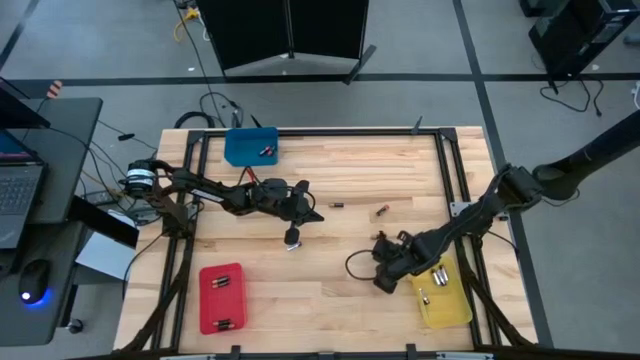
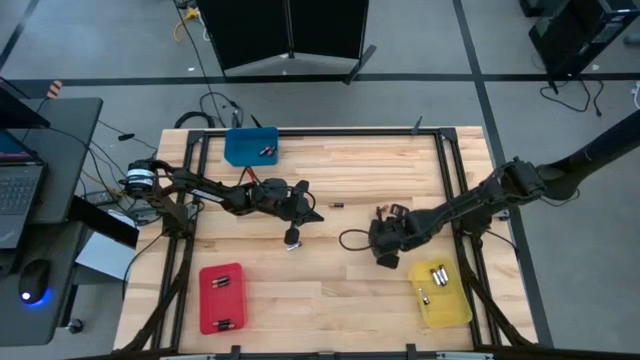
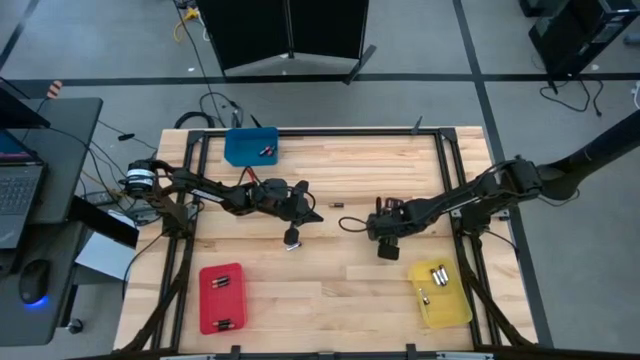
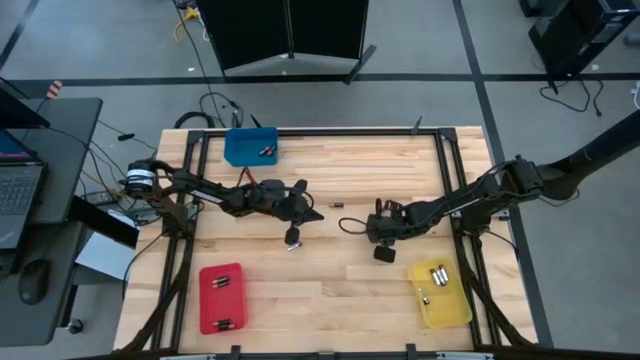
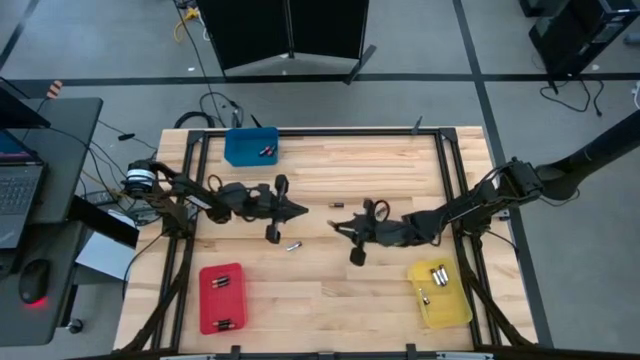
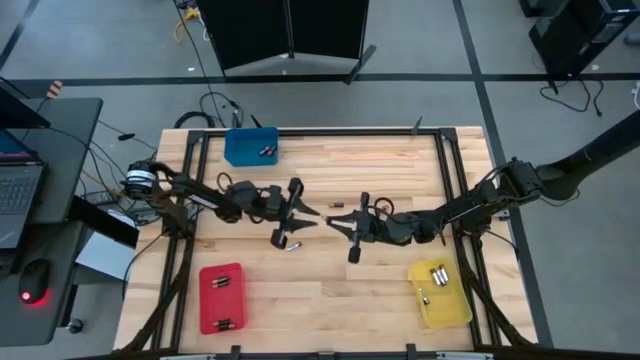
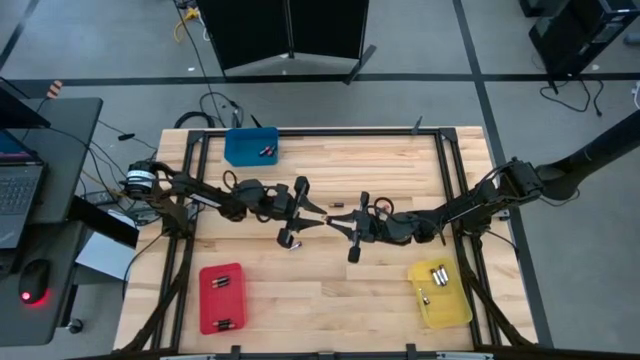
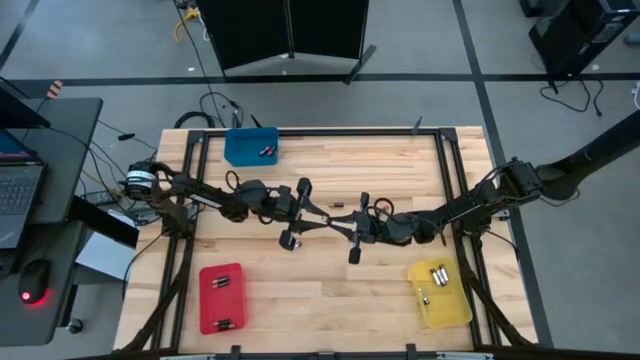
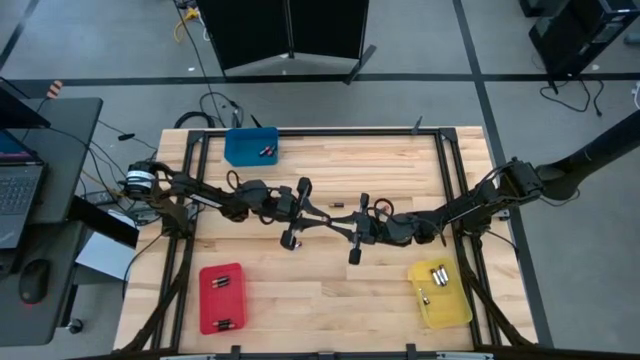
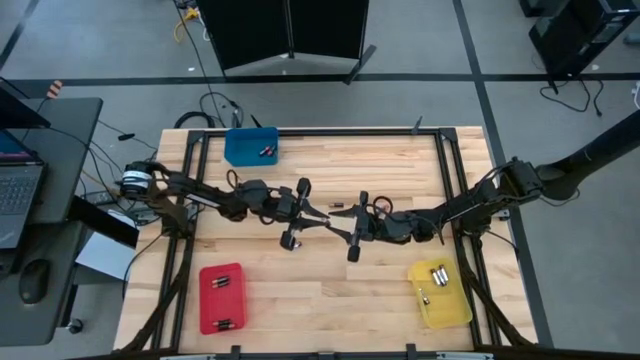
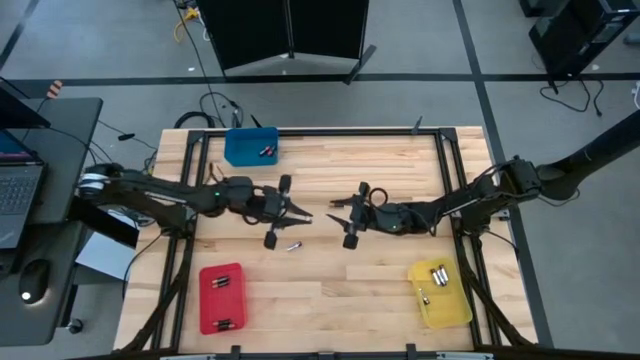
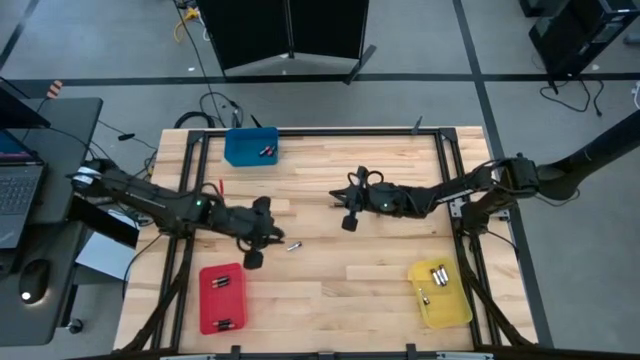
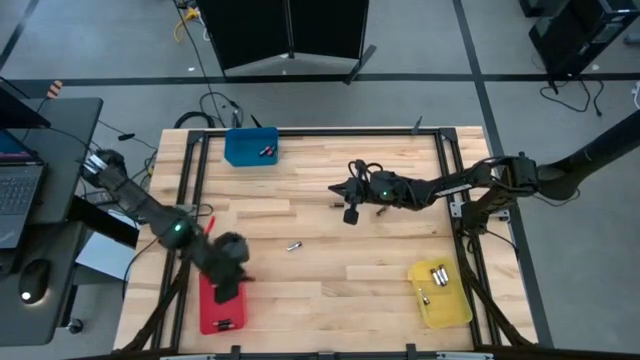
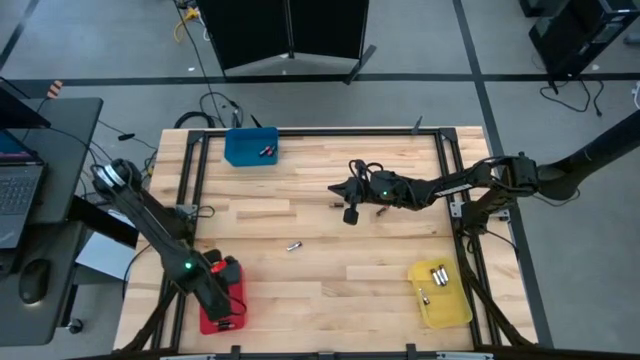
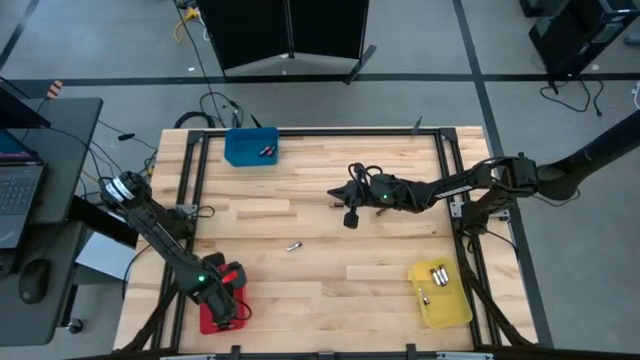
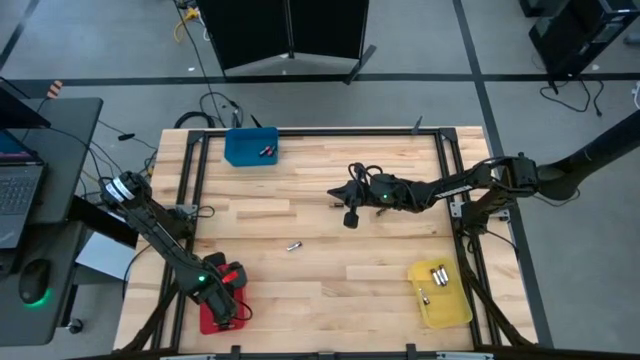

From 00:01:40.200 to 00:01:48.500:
Task: Sort batteries
Put the brown battery into the red bin

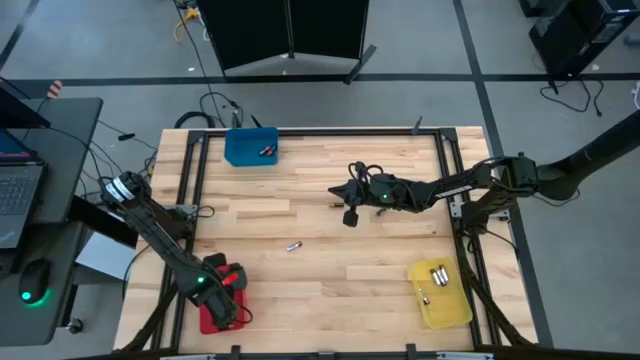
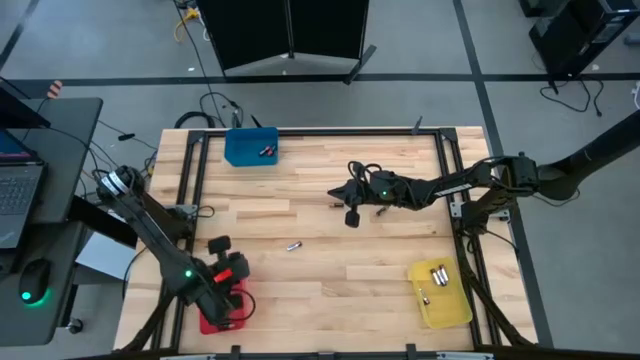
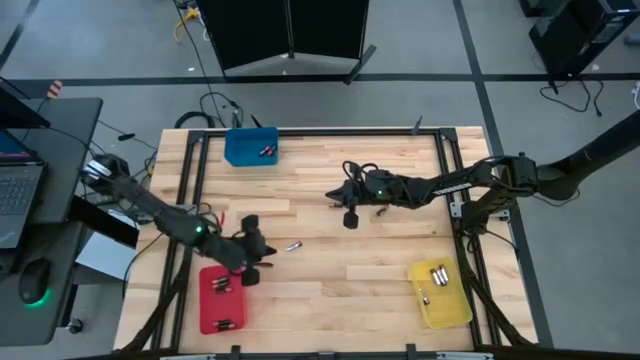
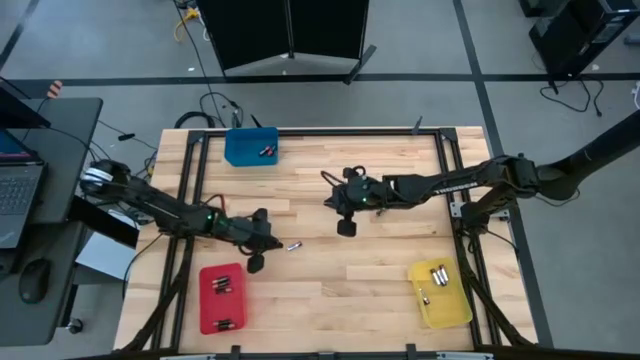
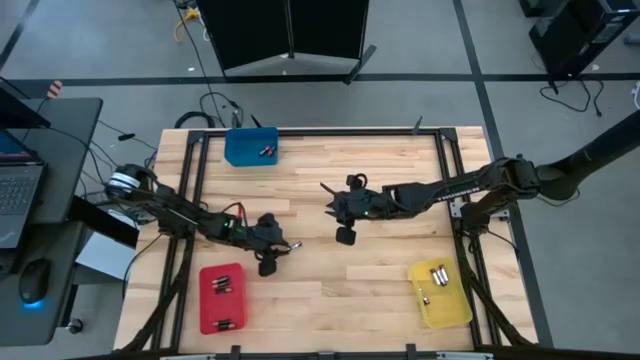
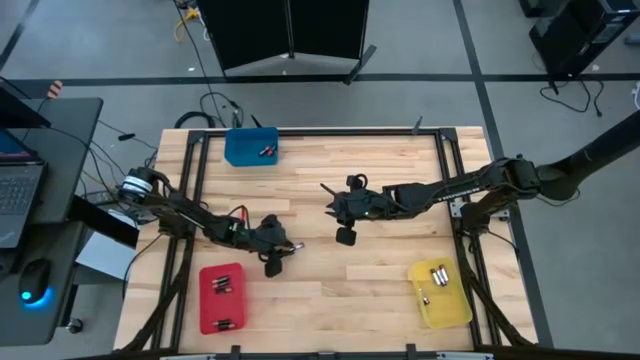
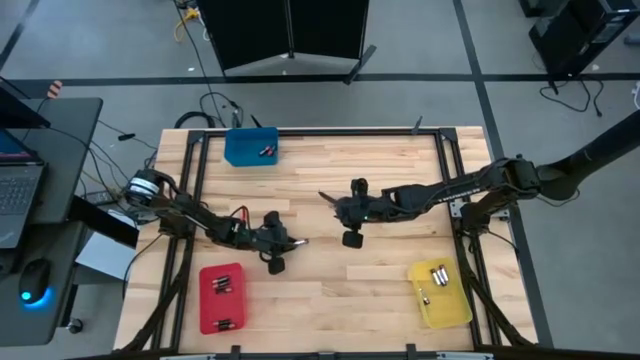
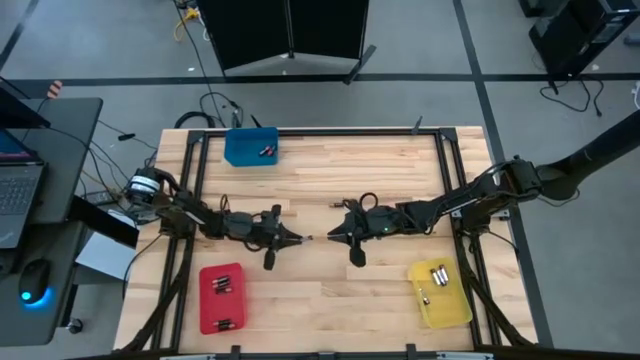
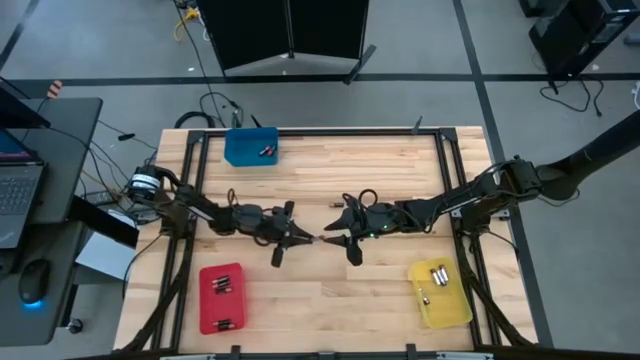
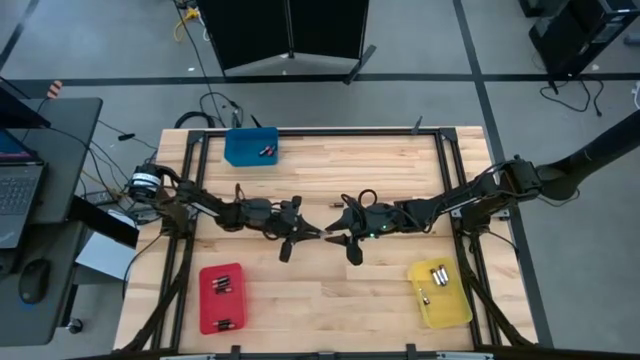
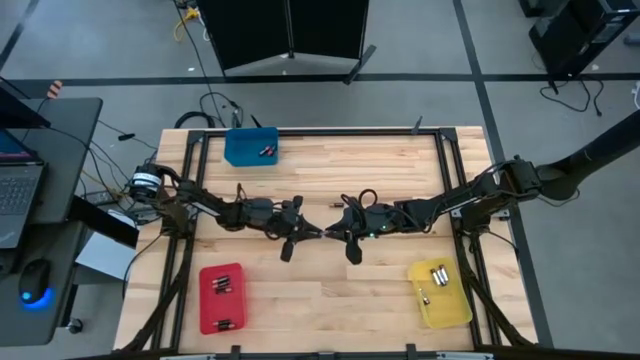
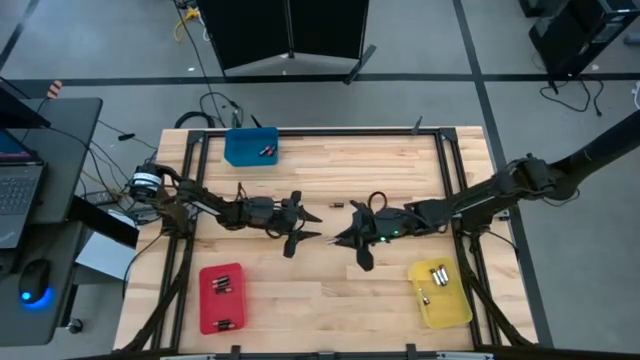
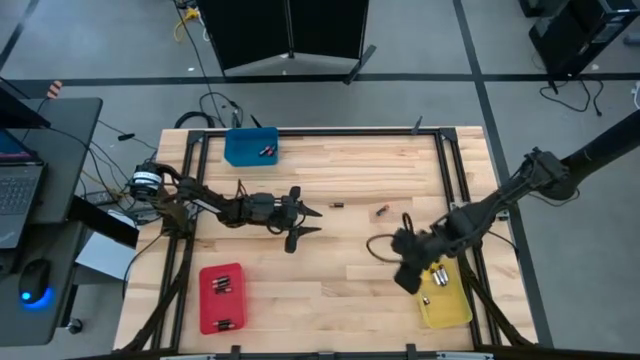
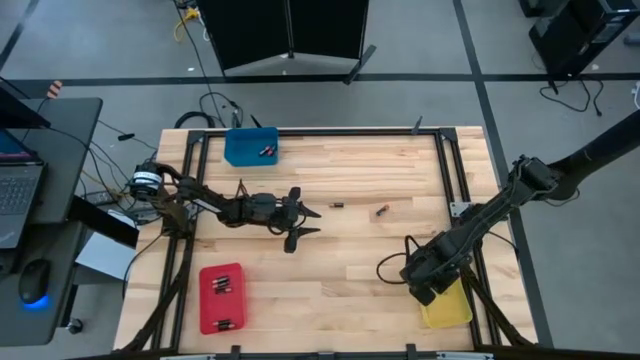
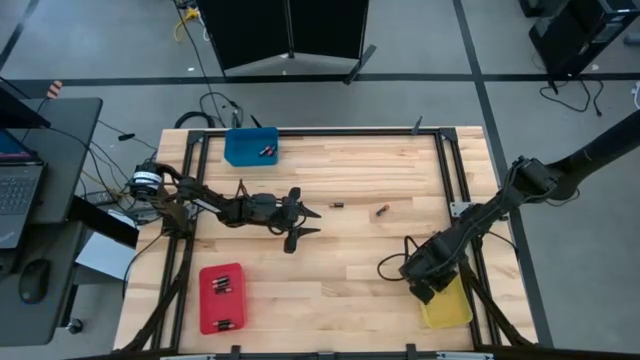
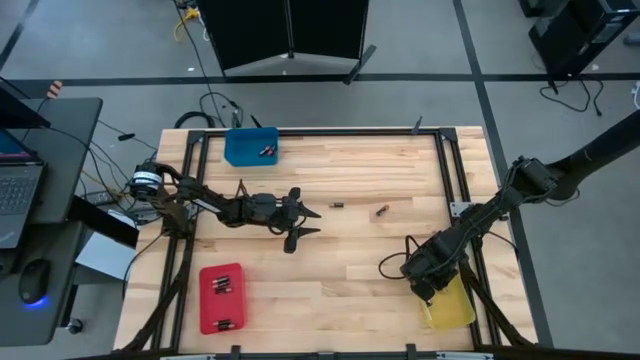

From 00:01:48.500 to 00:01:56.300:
Put the silver battery into the yellow bin

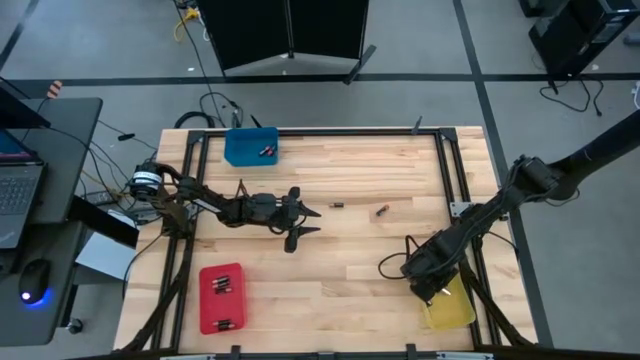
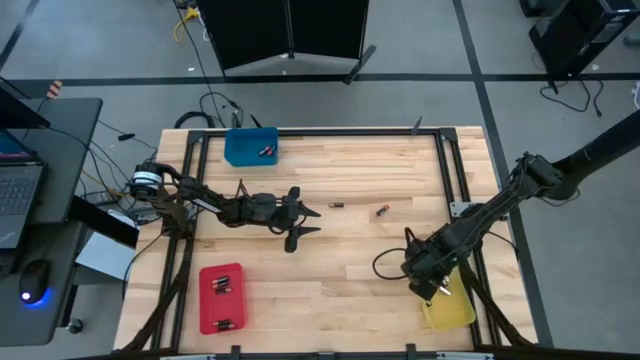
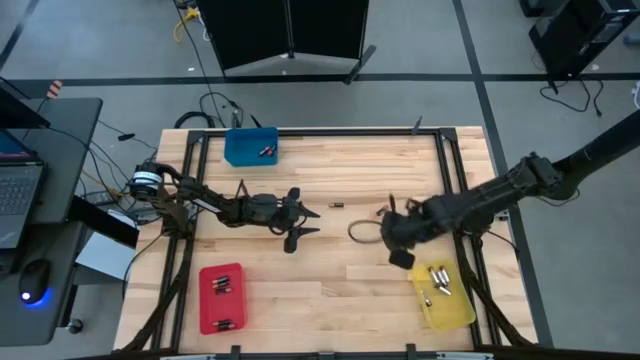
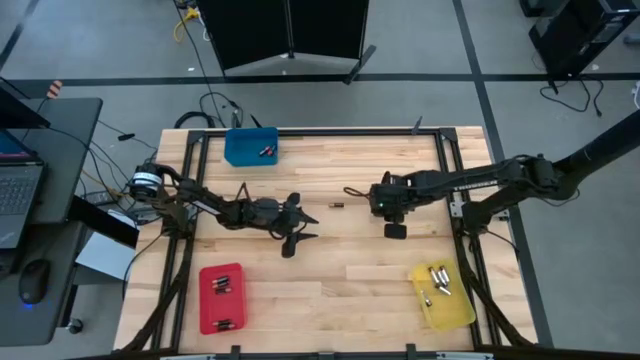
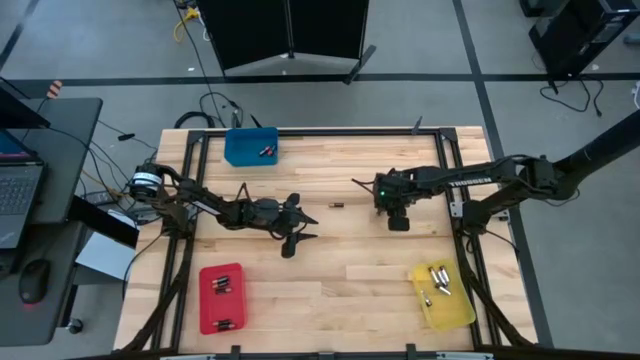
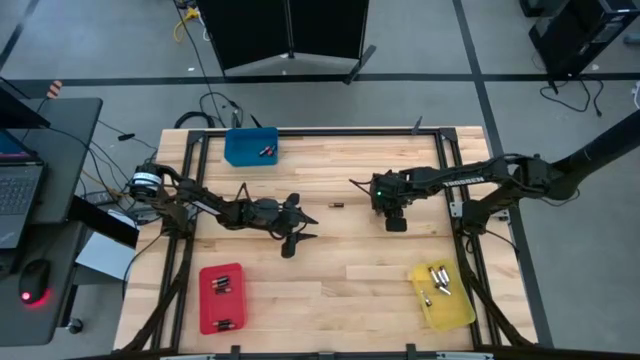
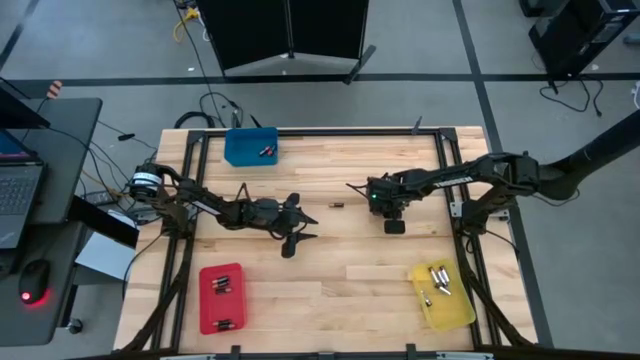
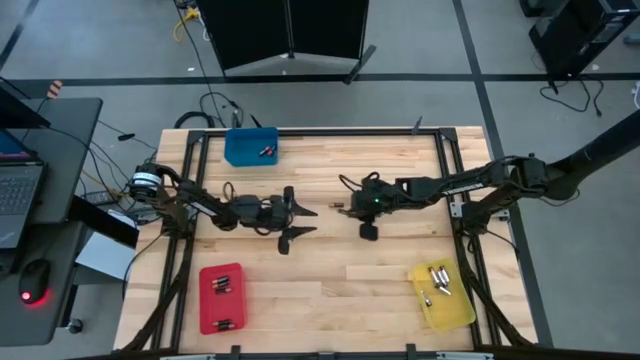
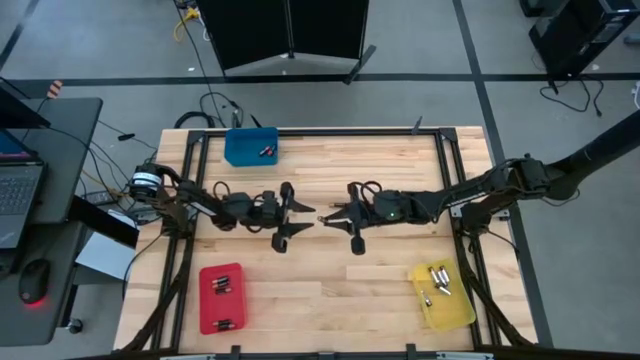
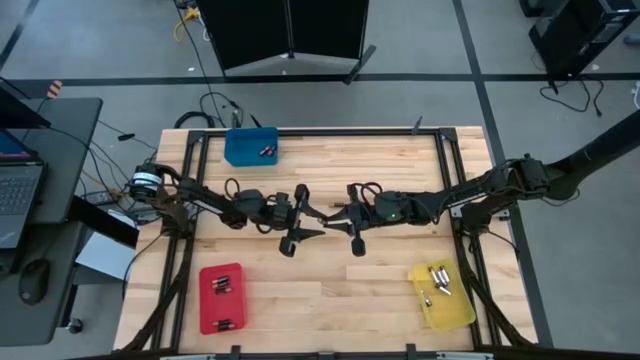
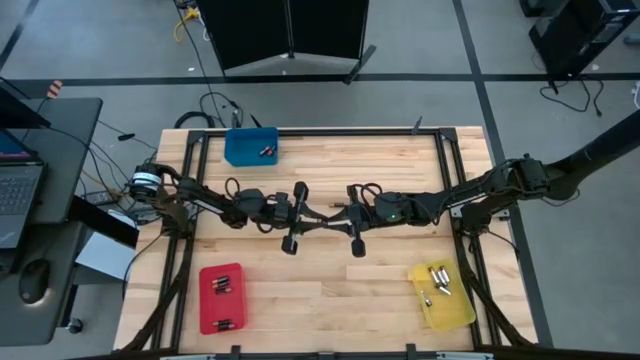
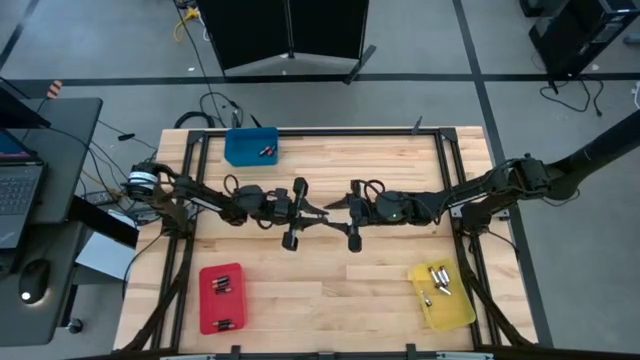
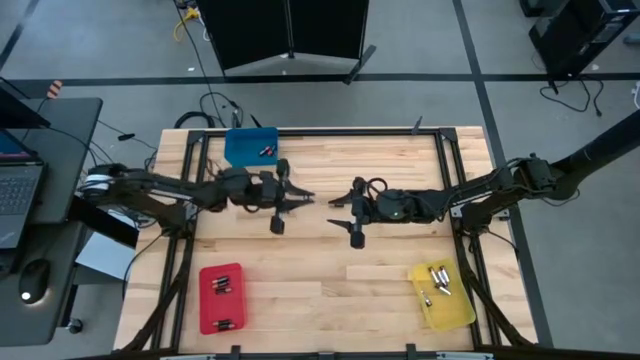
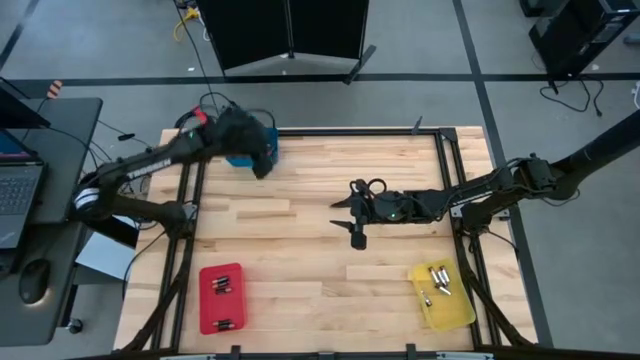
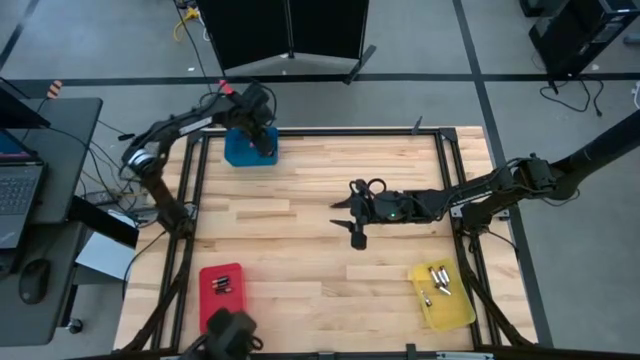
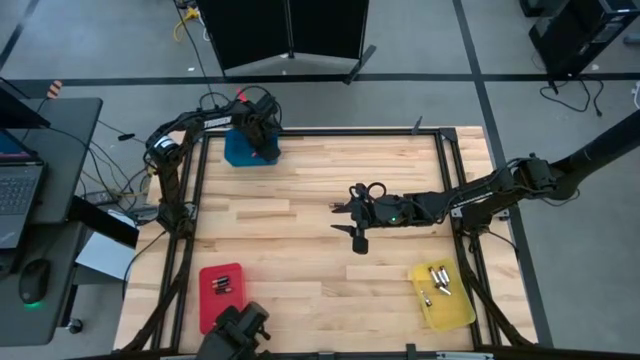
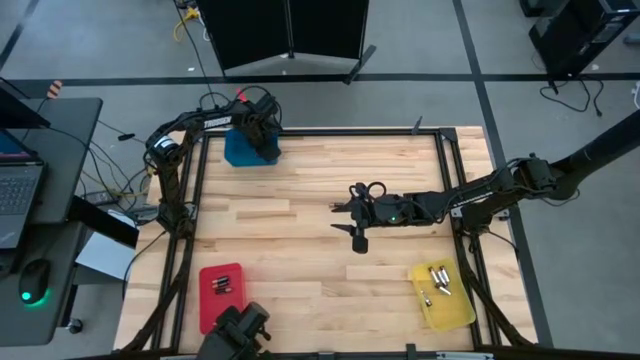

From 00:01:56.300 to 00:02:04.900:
Put the red battery into the blue bin
